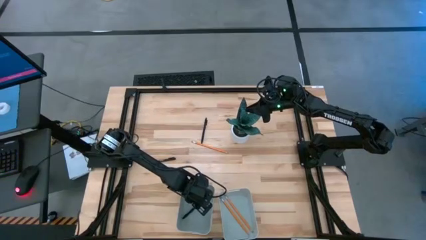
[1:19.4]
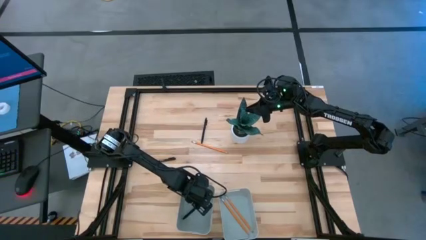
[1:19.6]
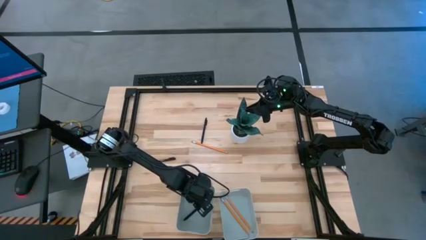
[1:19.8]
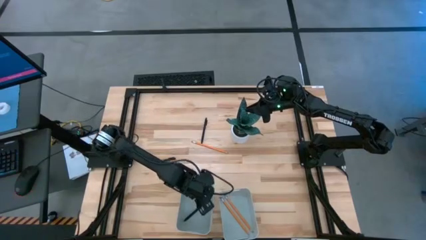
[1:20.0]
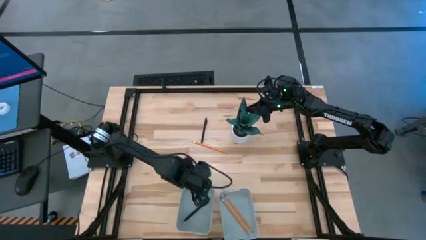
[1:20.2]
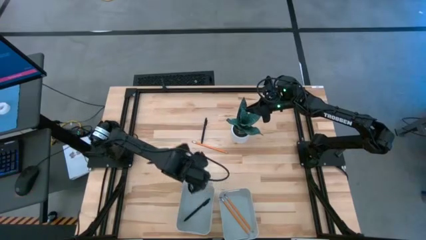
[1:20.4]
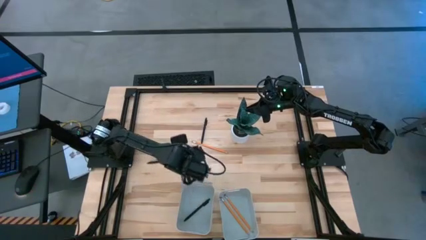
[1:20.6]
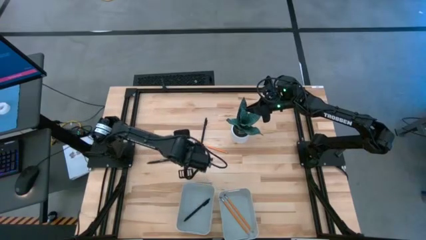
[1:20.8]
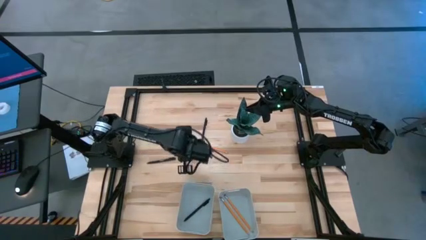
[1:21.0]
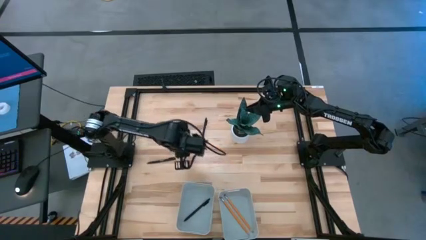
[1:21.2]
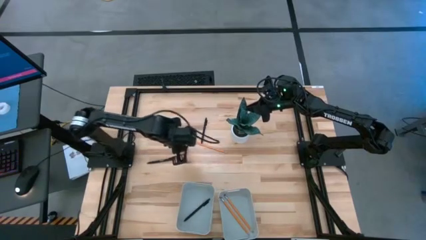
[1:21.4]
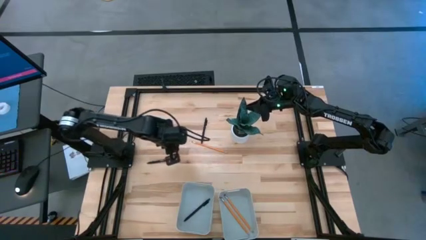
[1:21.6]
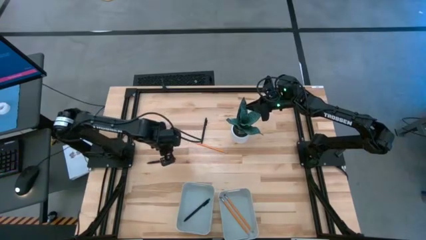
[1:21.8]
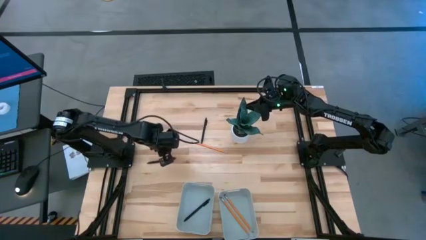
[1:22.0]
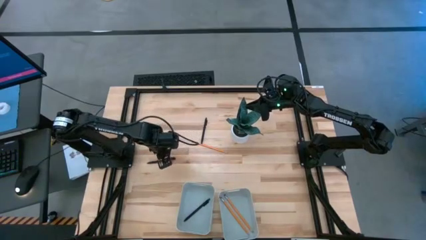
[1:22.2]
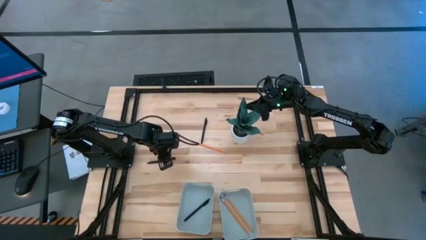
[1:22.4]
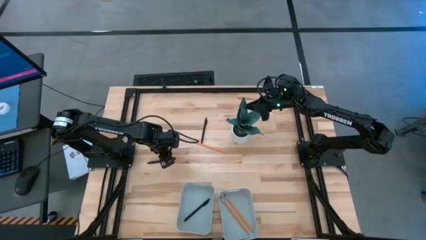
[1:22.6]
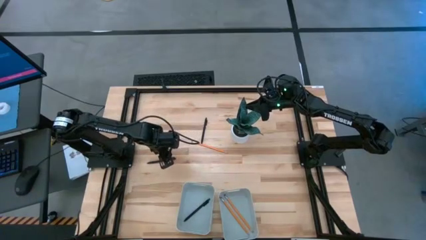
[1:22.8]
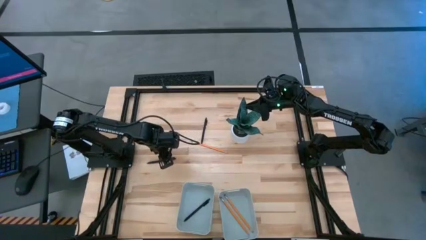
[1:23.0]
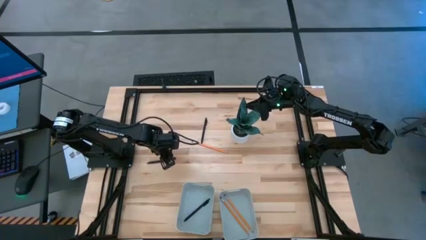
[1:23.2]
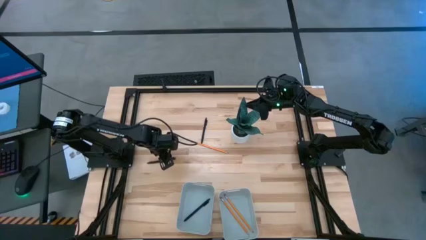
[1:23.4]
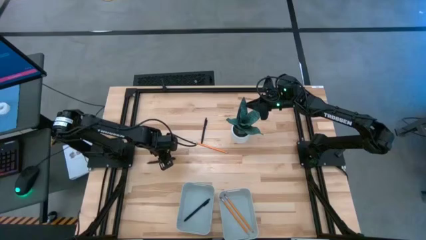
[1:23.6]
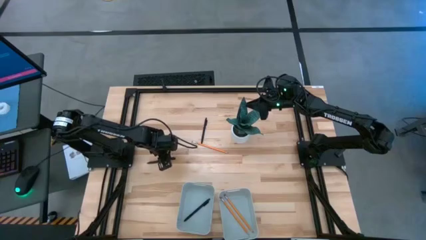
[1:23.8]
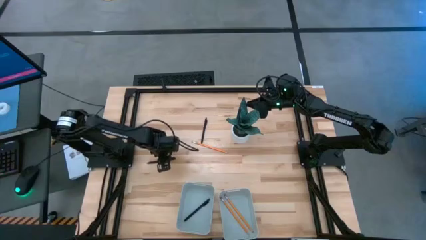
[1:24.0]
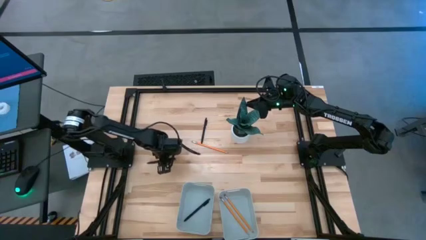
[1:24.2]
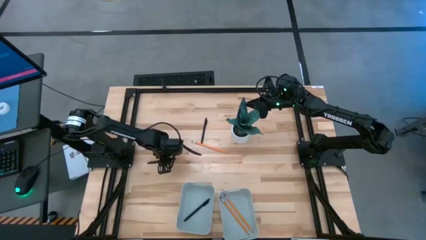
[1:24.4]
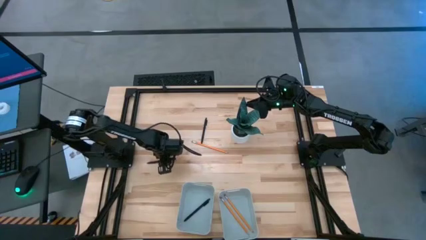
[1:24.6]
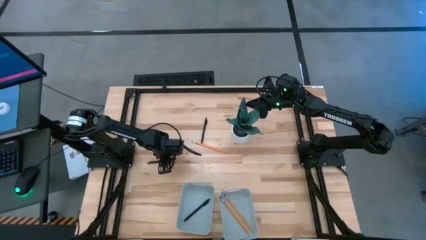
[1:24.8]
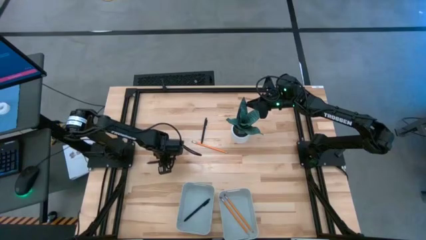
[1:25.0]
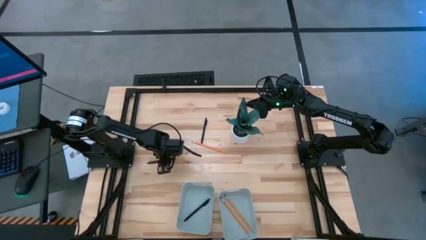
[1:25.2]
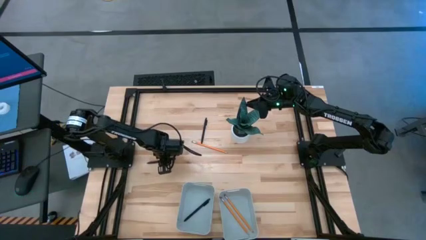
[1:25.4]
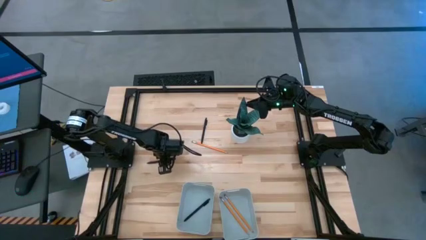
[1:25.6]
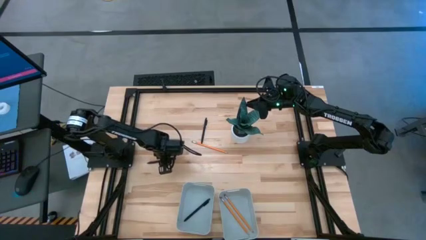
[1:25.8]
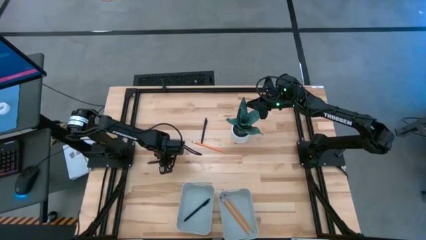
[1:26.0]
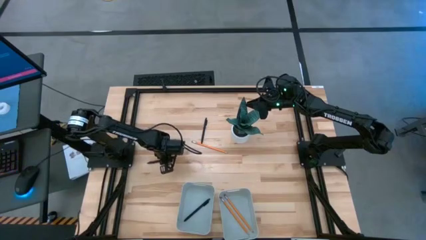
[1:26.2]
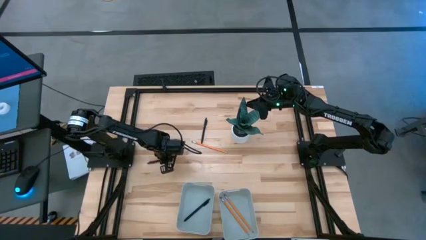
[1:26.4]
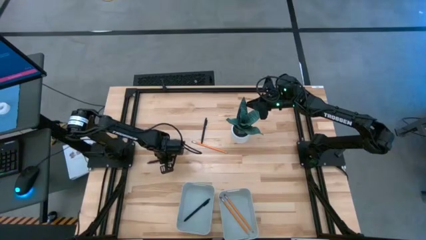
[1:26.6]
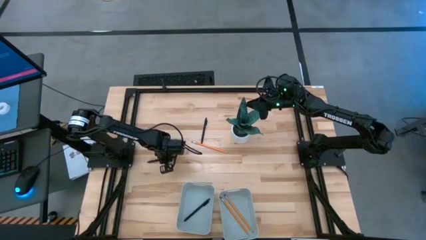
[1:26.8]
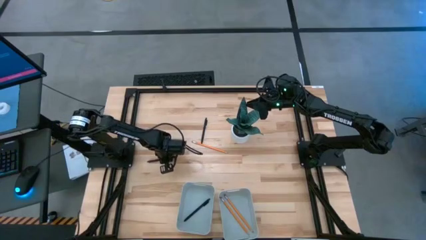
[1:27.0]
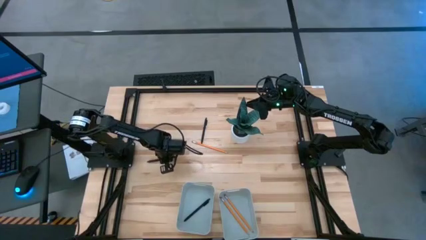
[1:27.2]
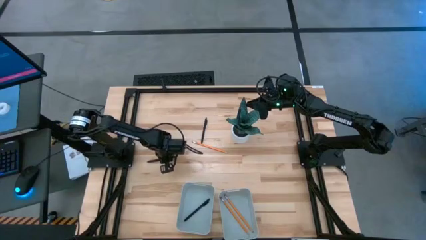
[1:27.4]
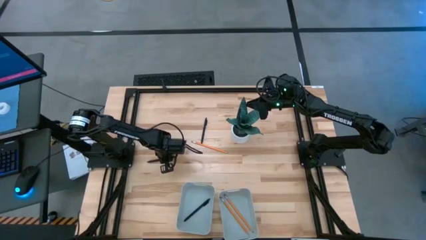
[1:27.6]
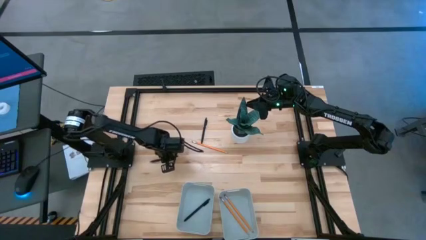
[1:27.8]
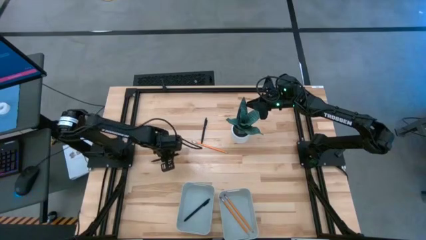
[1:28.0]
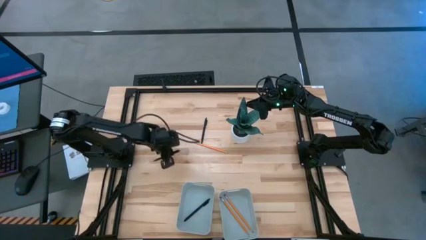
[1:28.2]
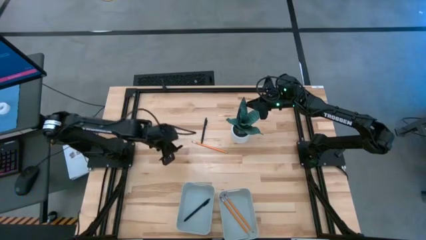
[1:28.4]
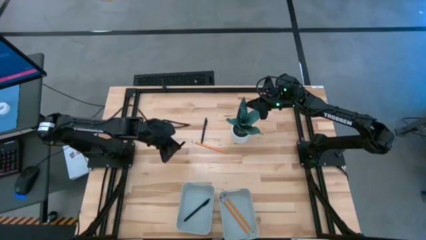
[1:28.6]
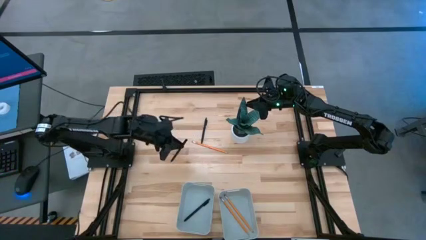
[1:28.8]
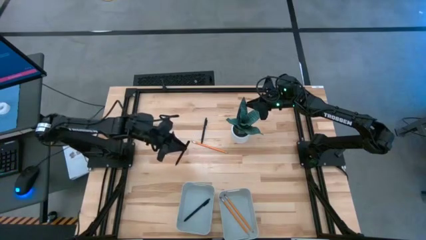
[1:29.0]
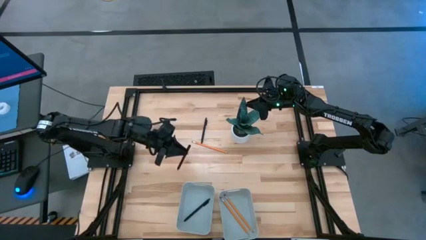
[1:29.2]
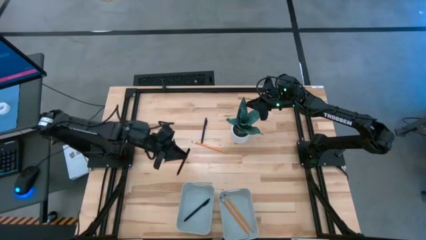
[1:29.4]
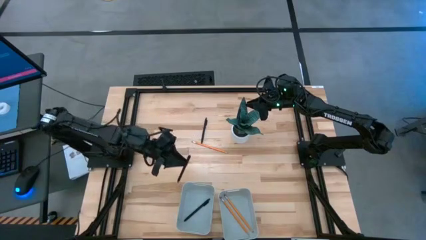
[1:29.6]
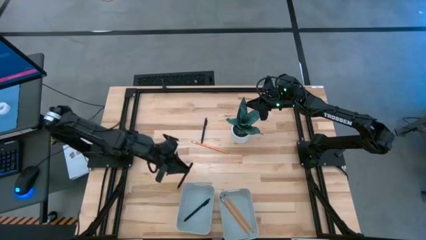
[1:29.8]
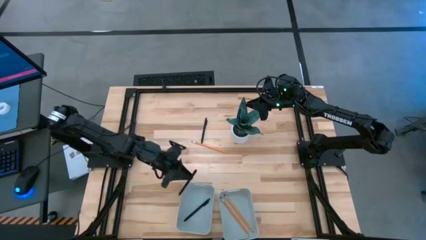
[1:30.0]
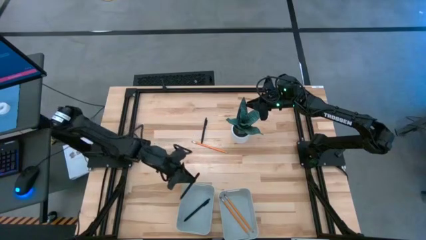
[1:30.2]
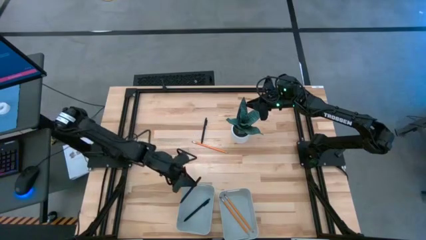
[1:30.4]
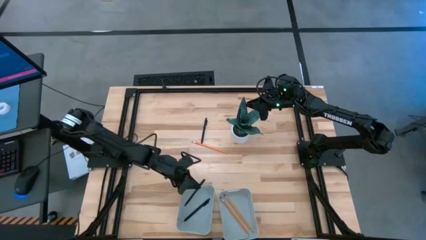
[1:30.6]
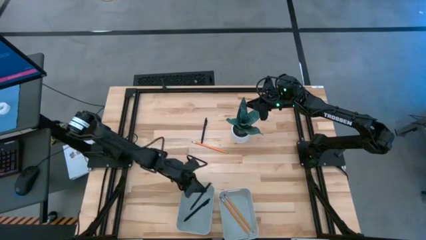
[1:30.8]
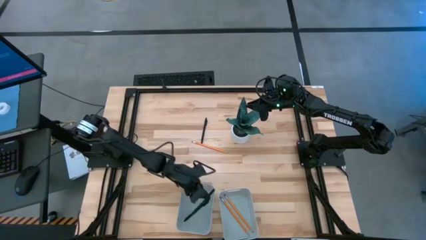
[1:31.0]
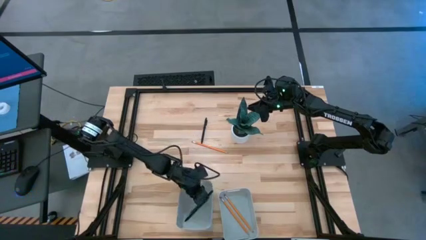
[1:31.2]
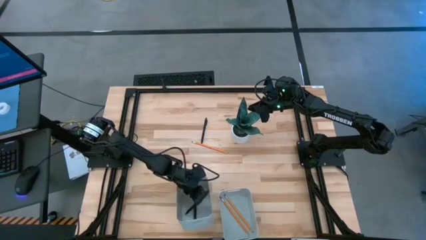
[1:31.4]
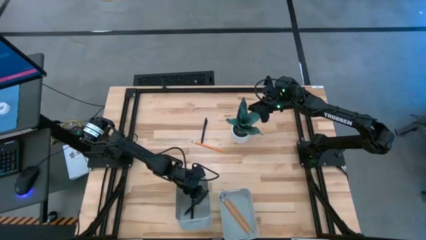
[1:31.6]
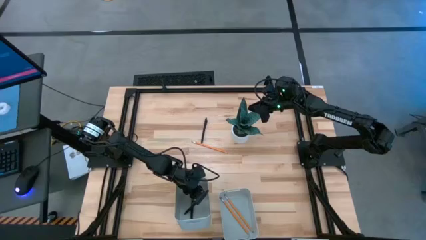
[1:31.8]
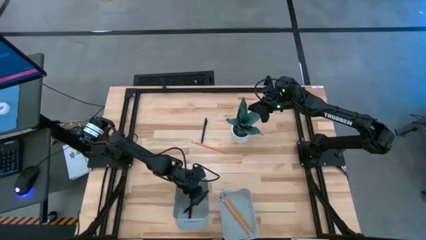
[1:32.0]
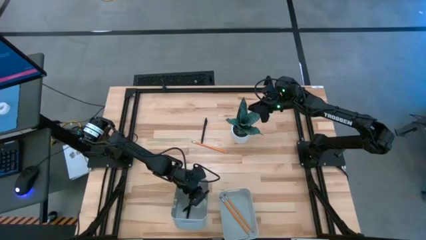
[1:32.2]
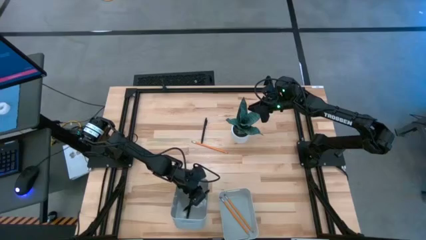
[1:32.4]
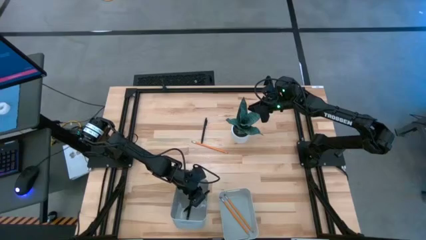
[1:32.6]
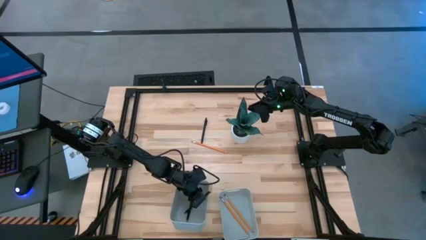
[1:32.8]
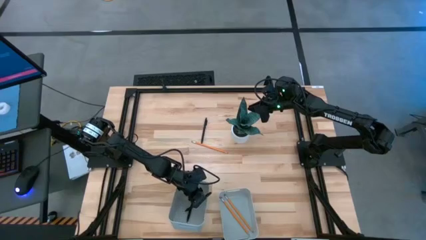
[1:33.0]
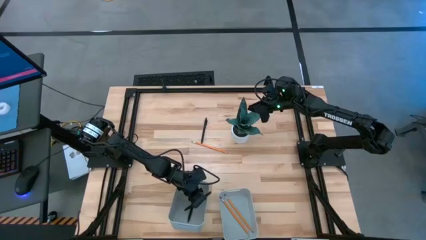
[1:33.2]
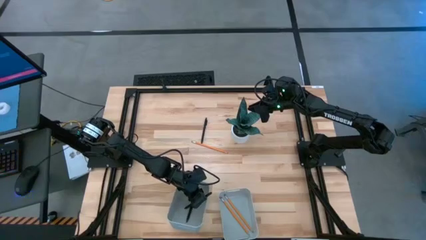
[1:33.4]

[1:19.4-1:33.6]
Task: Sort pens & pencils
Put the bottom pen into the left gray bin

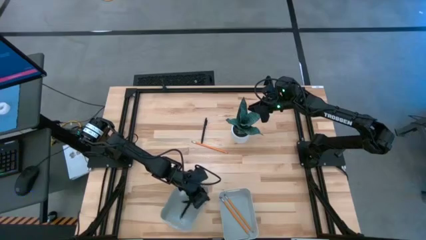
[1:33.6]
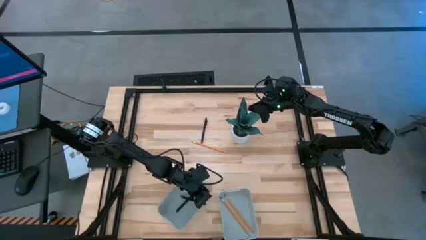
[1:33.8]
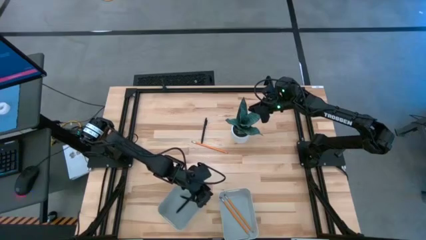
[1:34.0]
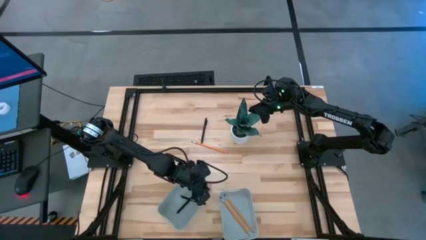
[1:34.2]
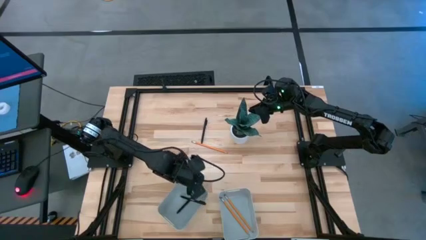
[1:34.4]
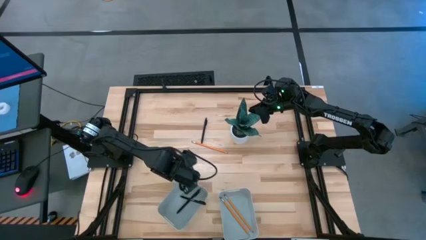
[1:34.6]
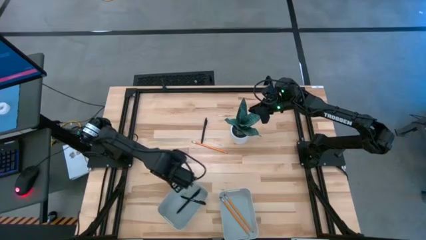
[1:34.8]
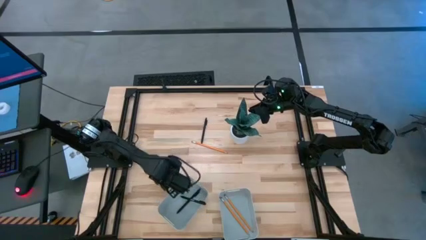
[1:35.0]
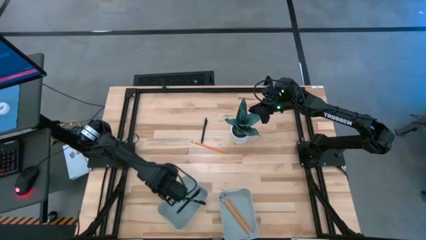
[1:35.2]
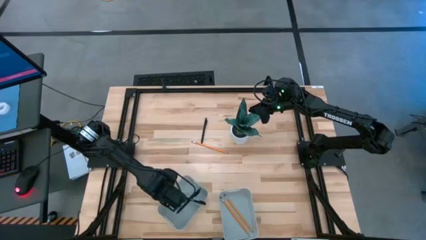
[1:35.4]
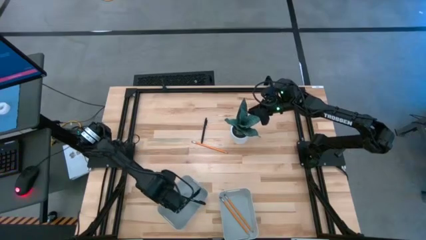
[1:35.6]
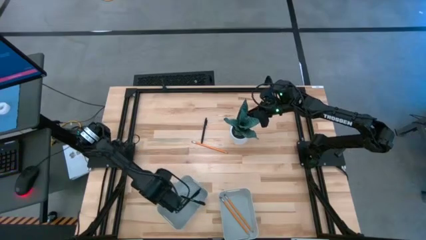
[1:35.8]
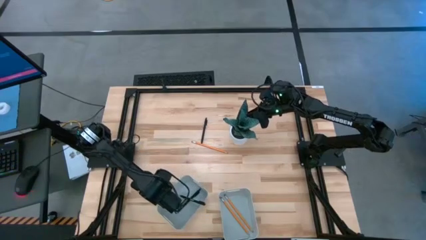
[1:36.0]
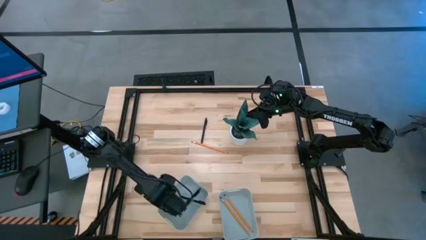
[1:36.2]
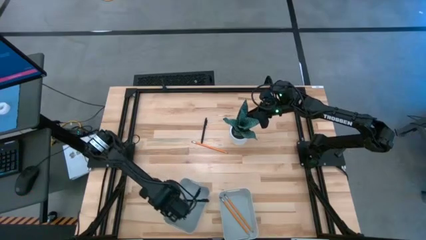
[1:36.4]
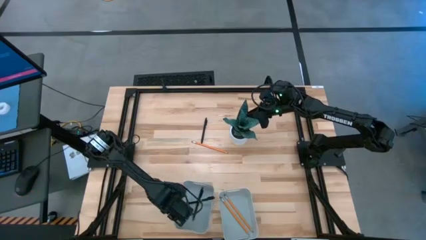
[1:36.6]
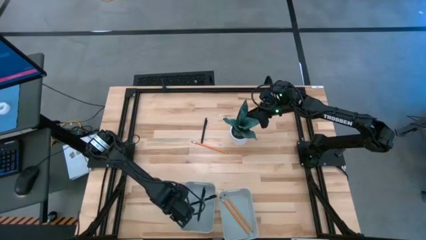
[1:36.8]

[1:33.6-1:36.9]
Adjust the left gray bin
